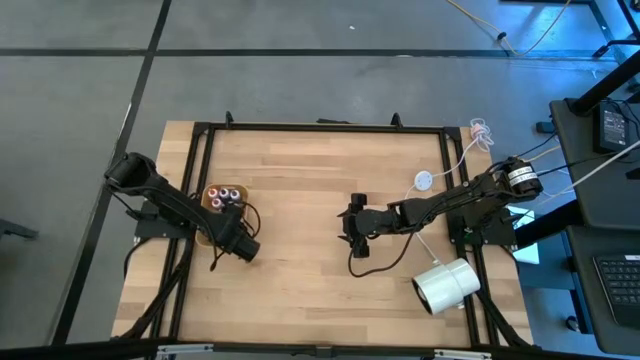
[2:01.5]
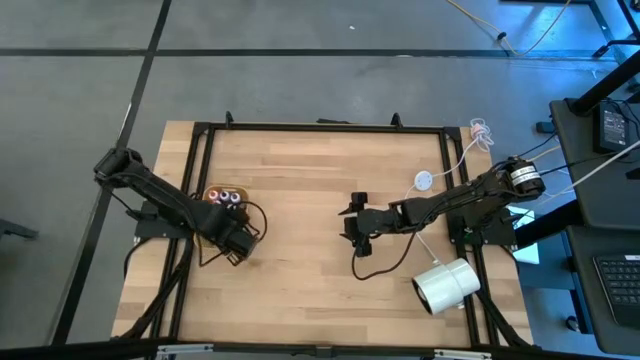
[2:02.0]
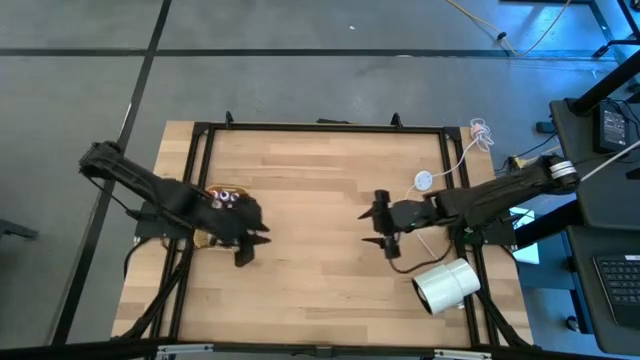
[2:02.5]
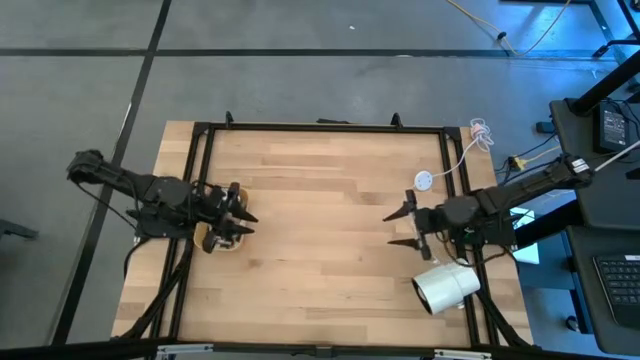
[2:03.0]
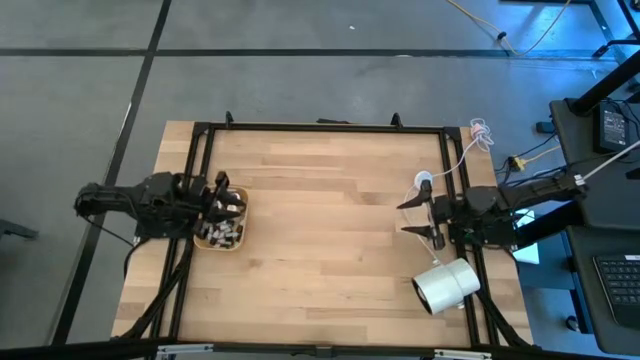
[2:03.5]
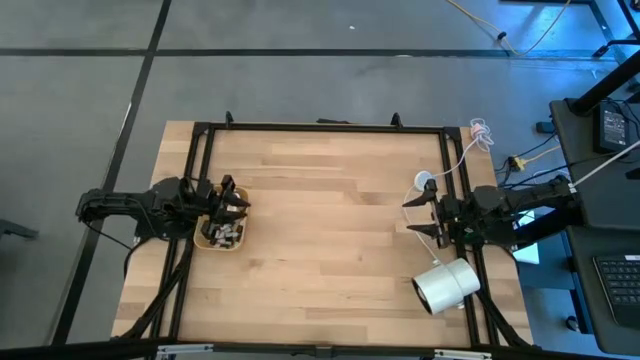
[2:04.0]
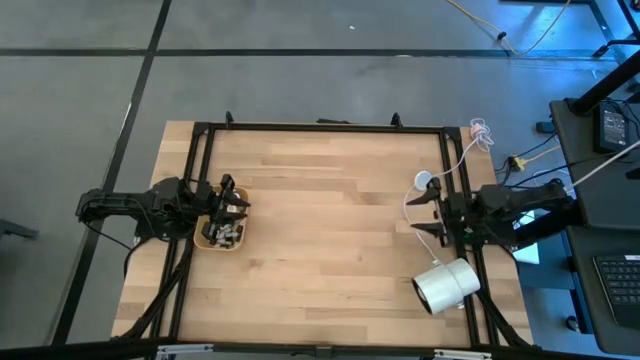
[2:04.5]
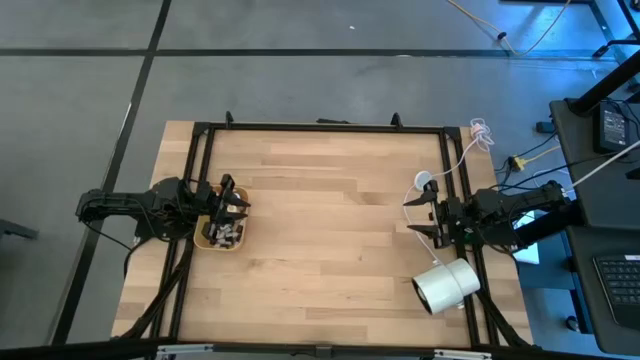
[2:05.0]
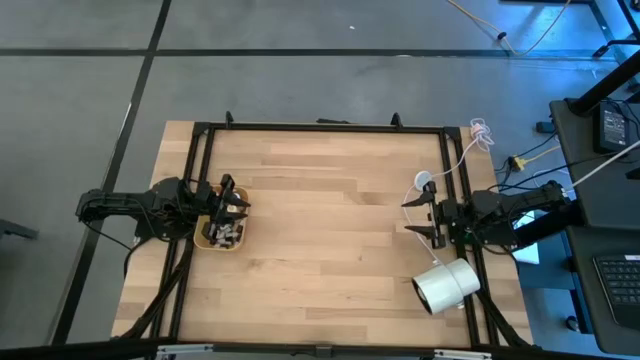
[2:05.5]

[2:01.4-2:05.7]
Task: Pick & Place food coloring
Return to Home Position

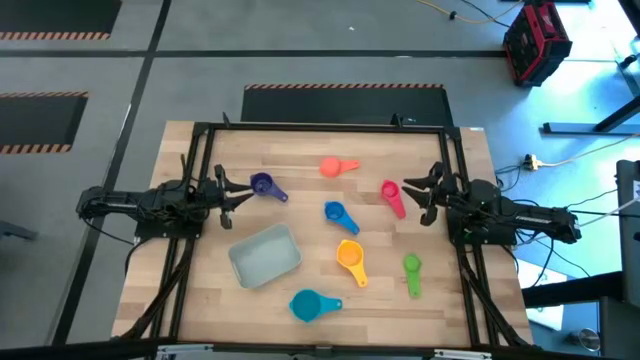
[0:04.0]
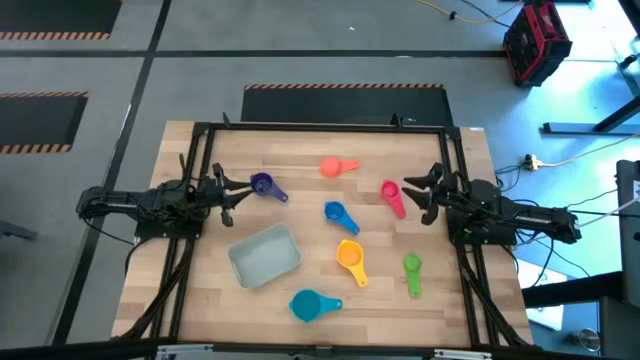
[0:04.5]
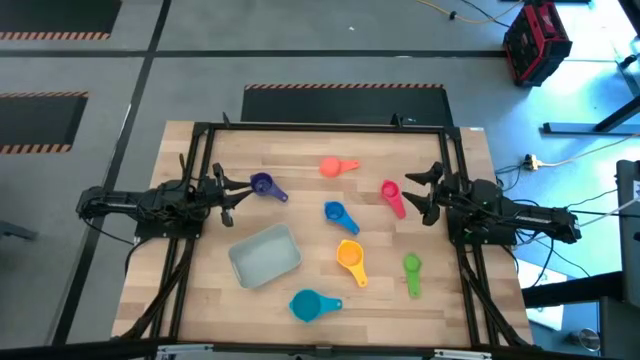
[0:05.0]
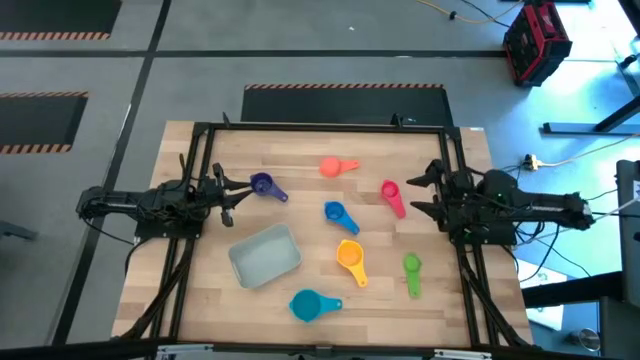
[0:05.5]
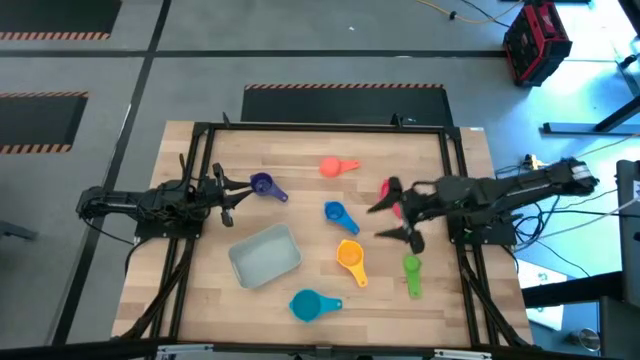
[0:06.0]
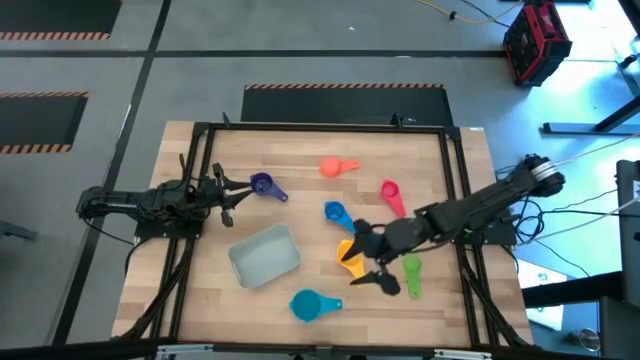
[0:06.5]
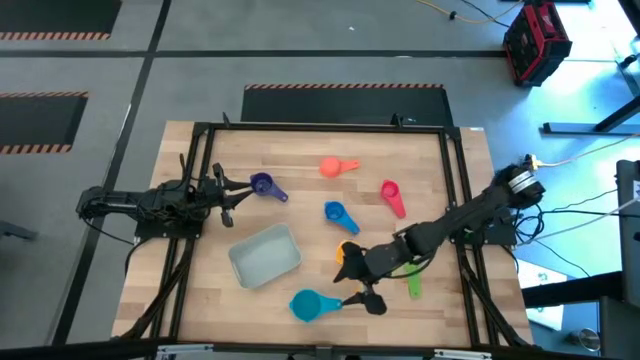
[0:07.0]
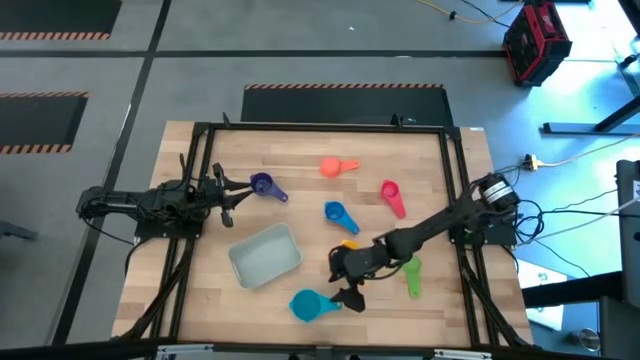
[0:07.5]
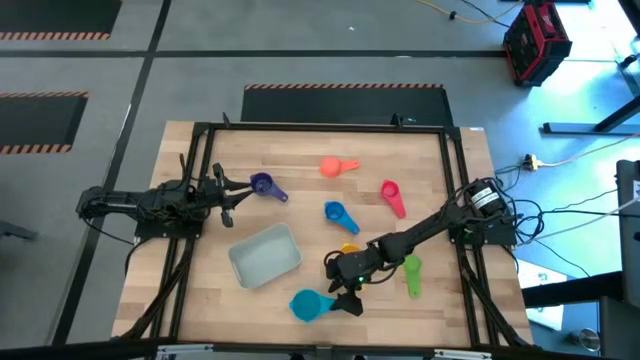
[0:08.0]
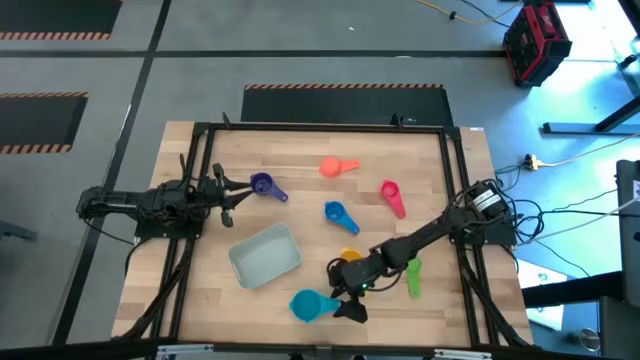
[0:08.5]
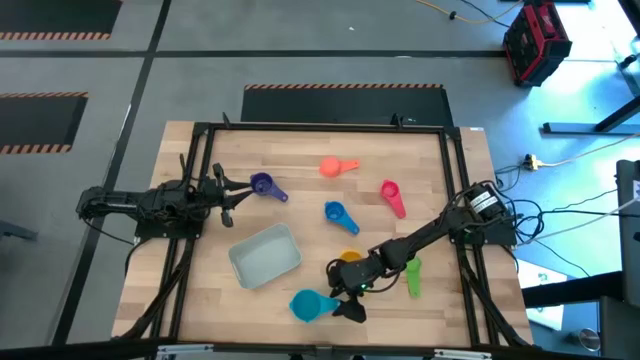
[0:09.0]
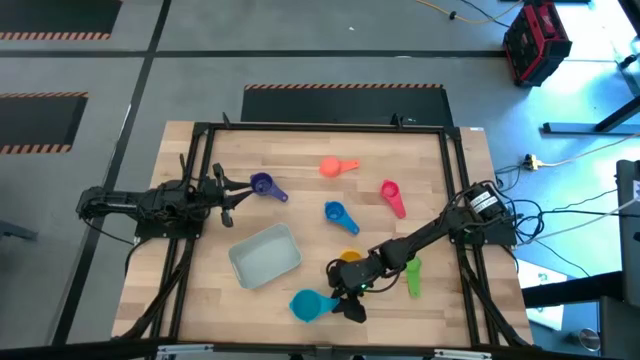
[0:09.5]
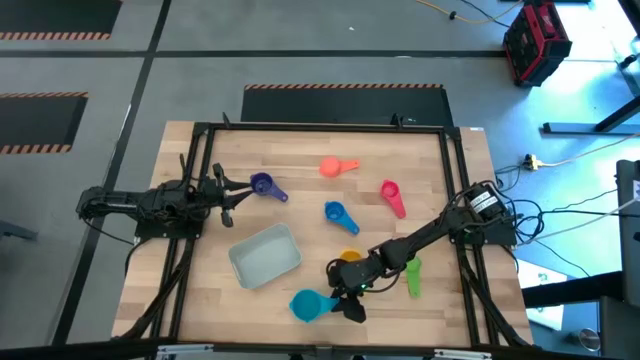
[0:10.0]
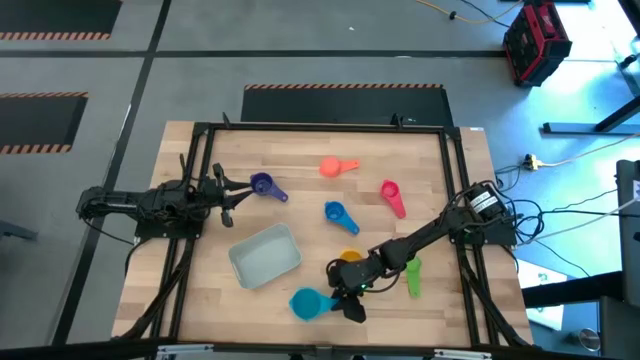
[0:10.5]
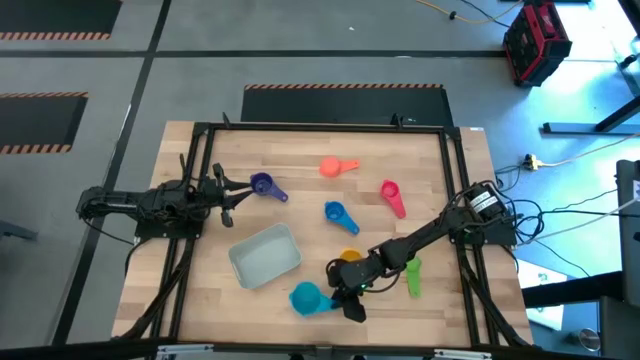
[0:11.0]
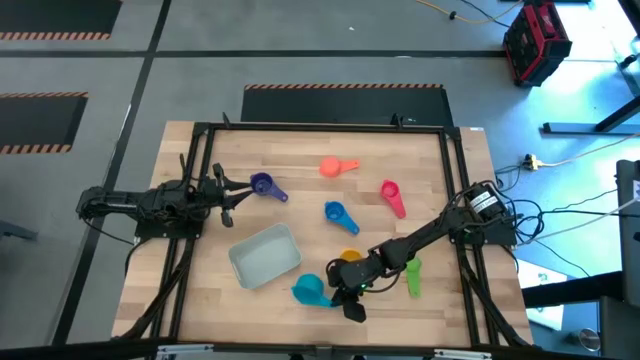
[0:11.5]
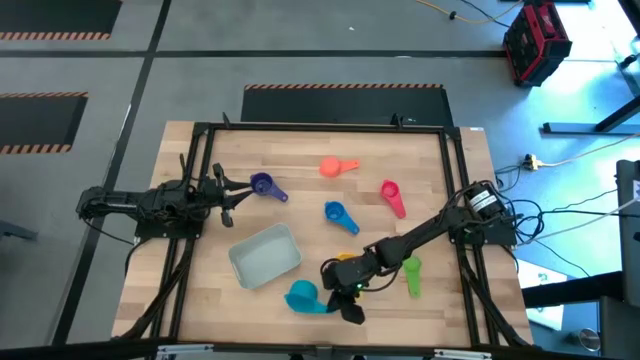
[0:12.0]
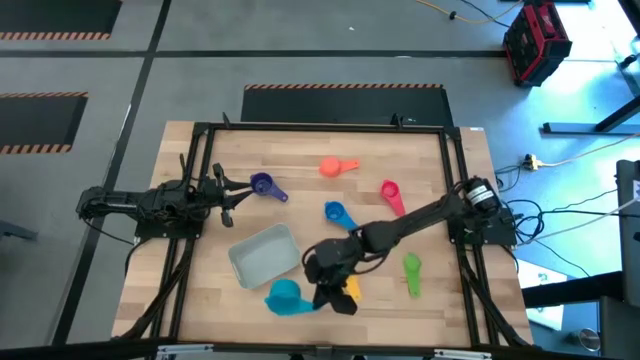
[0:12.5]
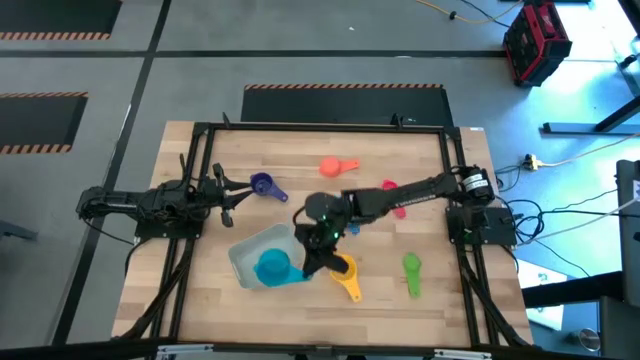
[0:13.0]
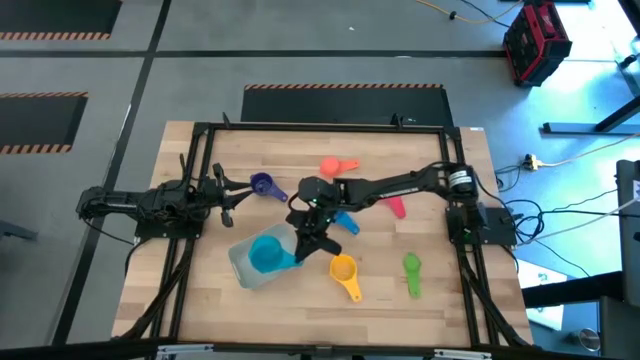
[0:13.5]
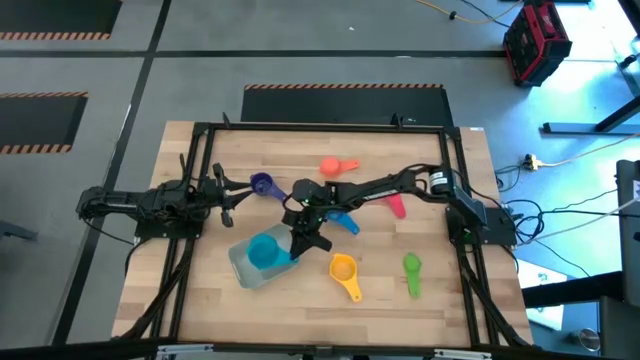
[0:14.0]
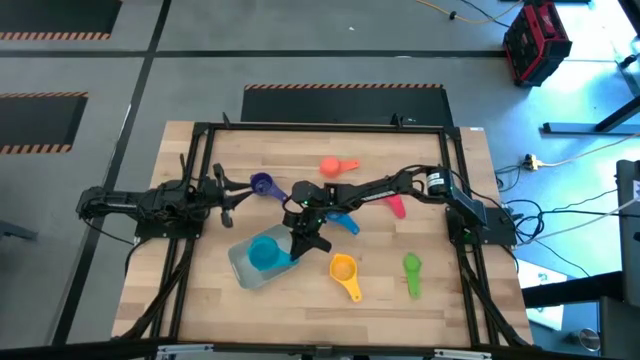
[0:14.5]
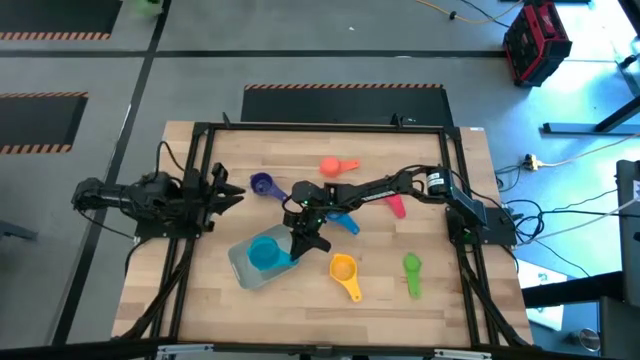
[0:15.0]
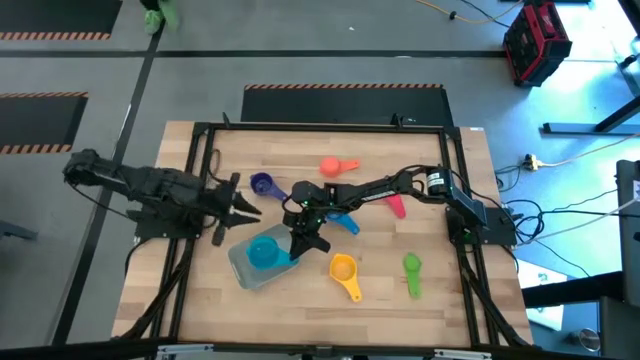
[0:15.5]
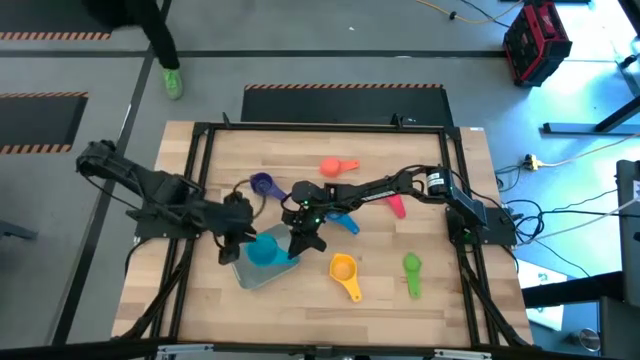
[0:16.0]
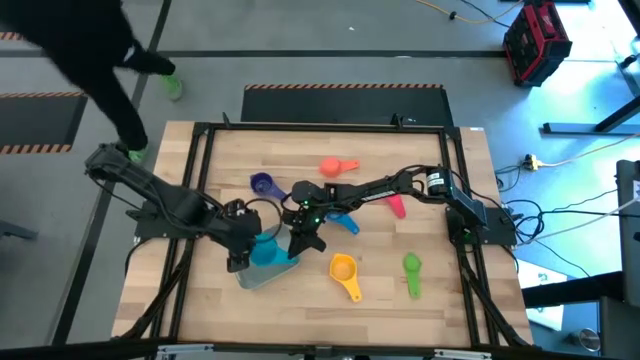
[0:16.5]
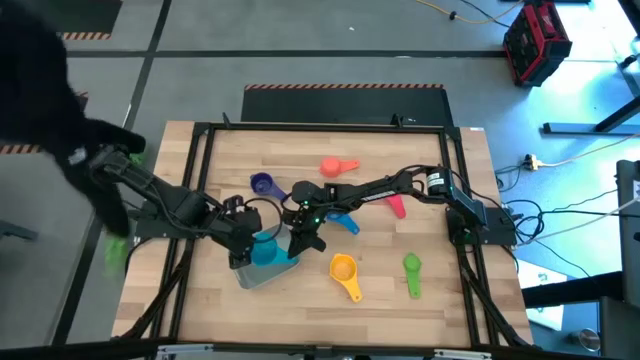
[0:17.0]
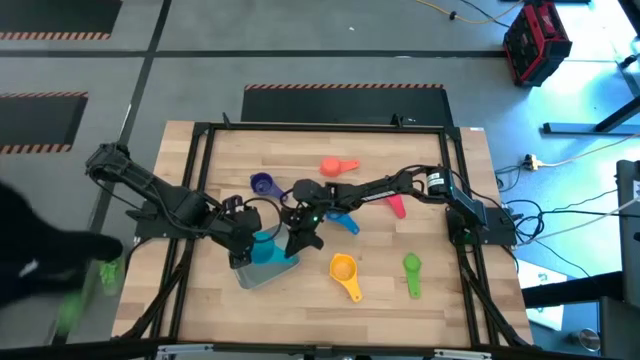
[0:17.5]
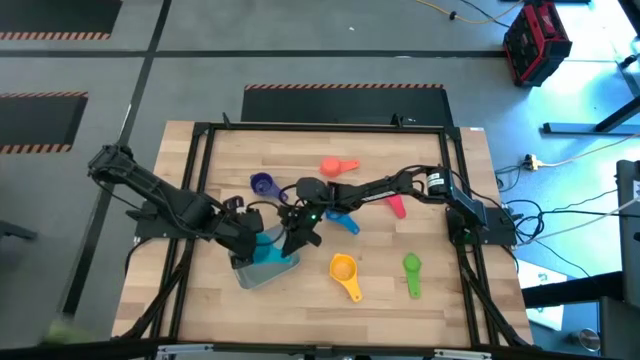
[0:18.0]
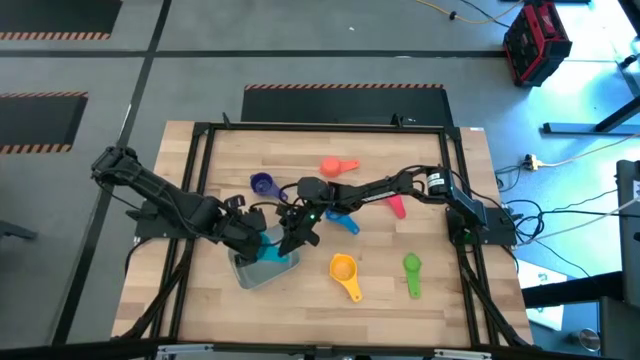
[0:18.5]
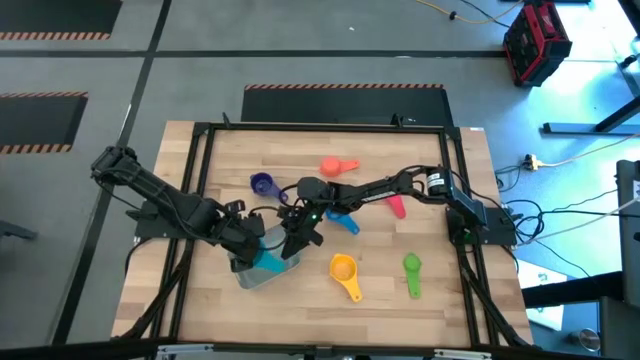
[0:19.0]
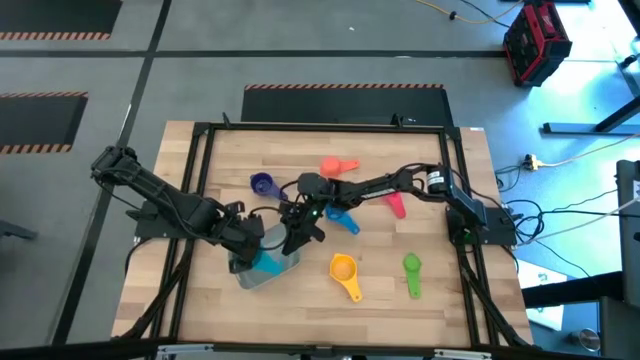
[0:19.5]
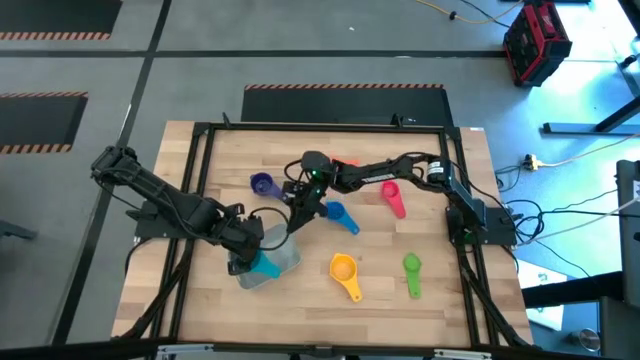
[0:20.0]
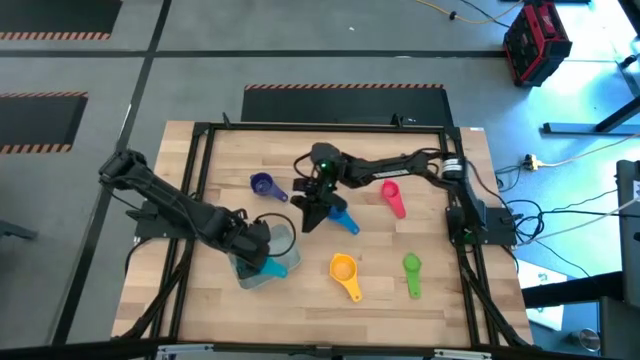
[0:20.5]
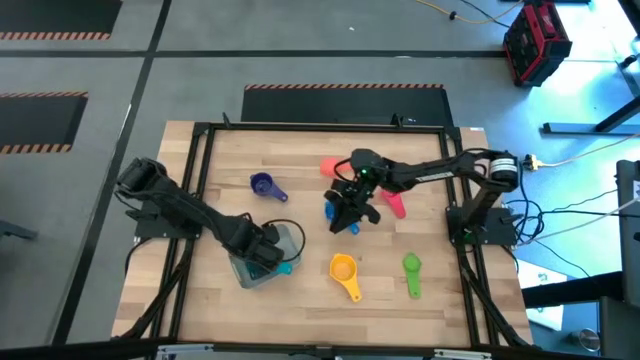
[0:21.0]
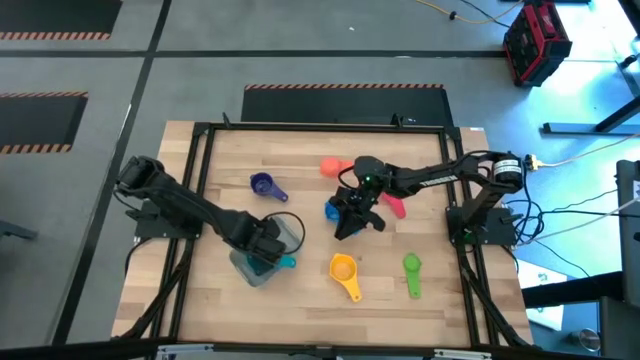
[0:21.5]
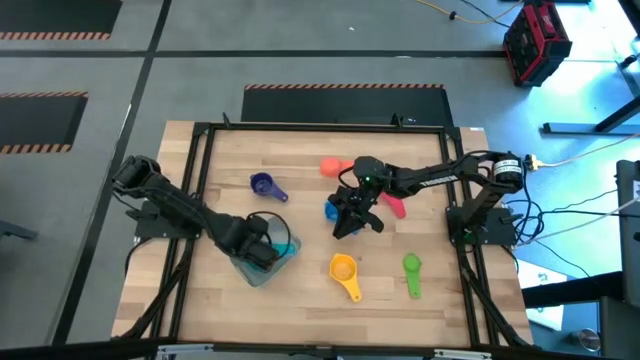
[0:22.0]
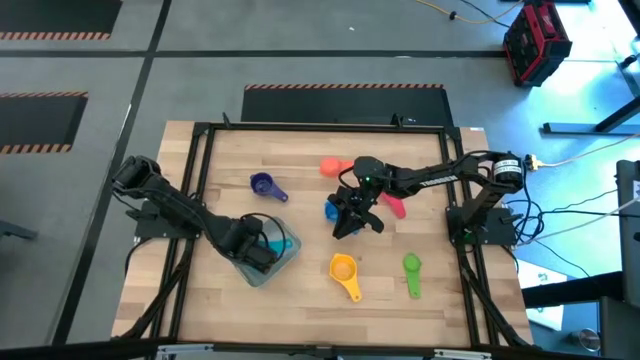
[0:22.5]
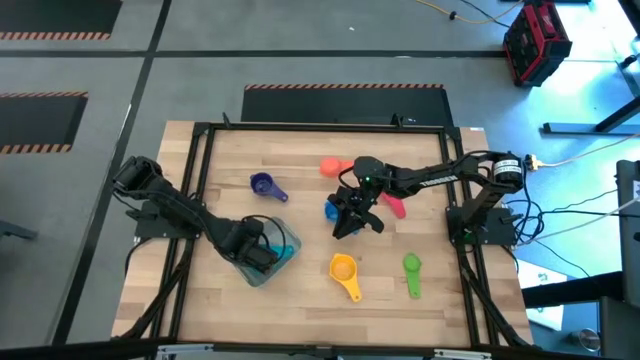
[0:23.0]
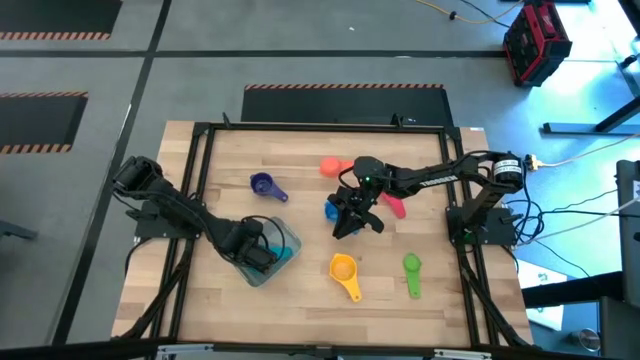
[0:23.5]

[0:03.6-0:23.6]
Task: Nest measuring cups in basket
Put the light blue measuring cup into the bin
